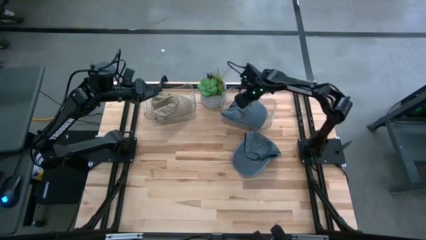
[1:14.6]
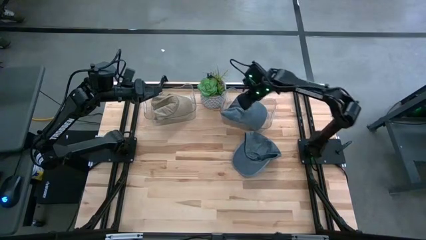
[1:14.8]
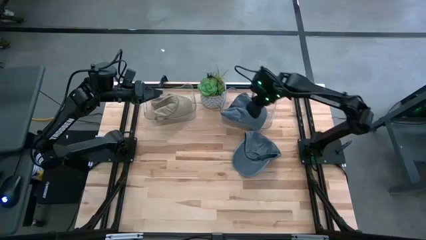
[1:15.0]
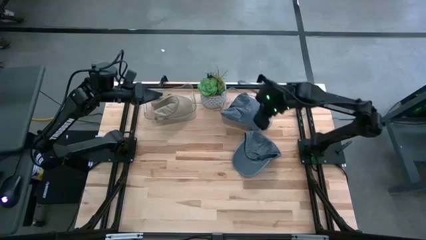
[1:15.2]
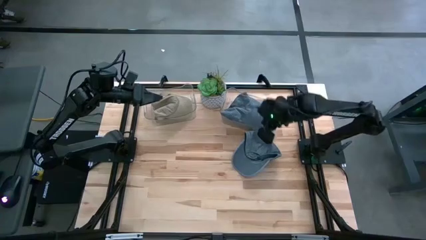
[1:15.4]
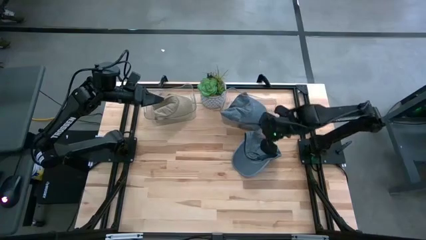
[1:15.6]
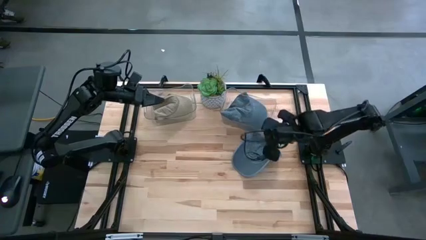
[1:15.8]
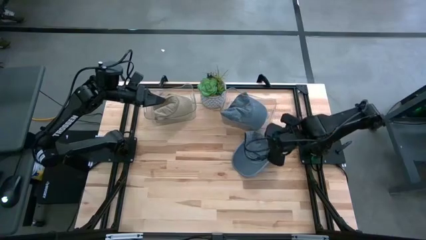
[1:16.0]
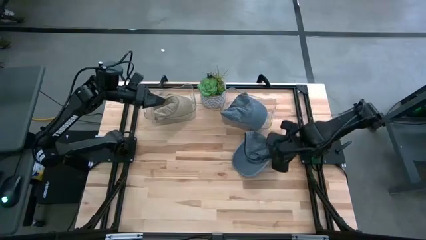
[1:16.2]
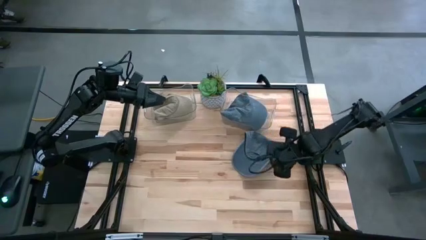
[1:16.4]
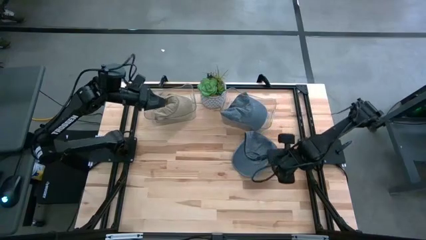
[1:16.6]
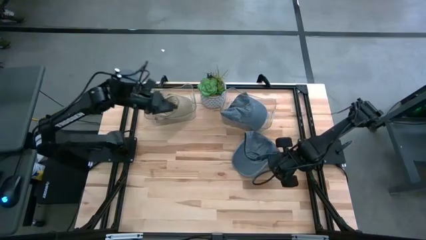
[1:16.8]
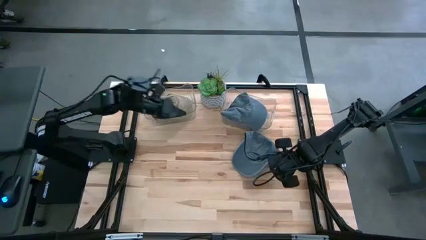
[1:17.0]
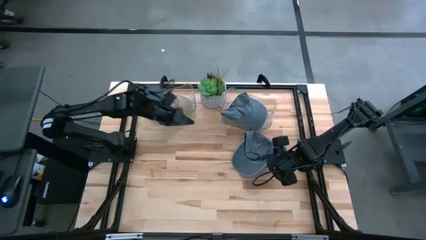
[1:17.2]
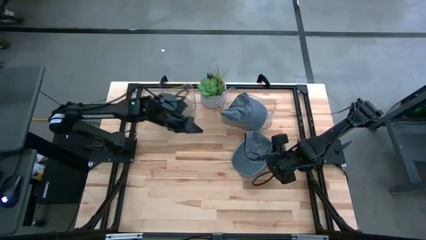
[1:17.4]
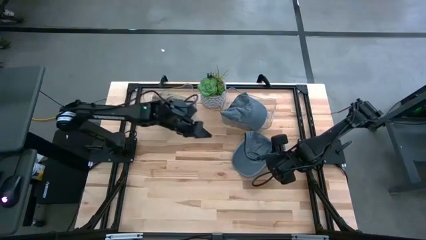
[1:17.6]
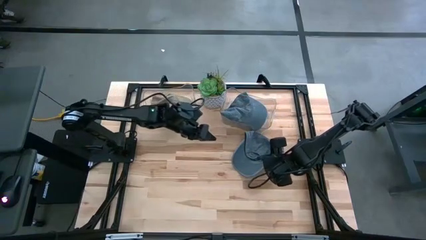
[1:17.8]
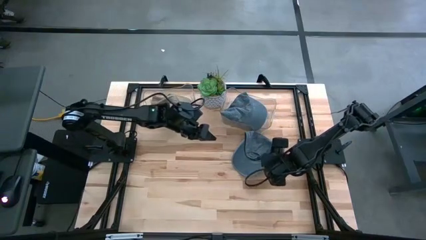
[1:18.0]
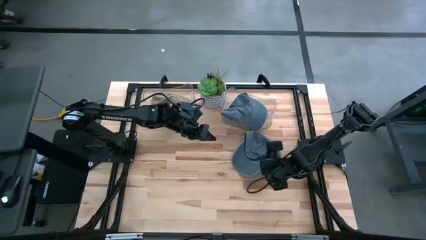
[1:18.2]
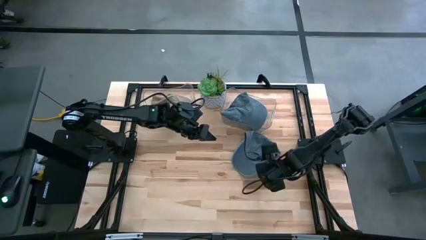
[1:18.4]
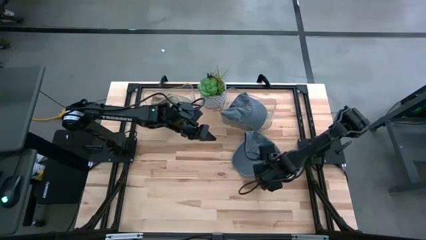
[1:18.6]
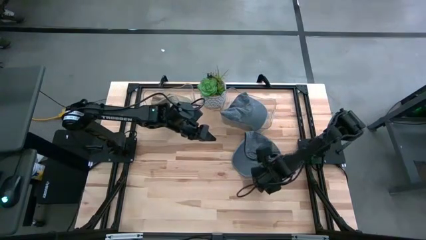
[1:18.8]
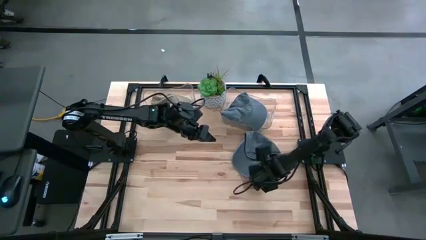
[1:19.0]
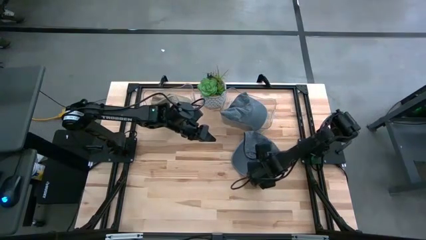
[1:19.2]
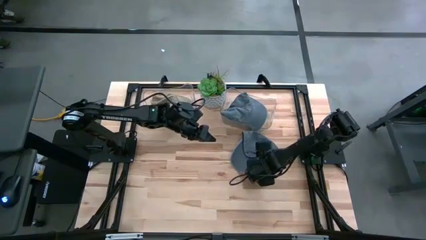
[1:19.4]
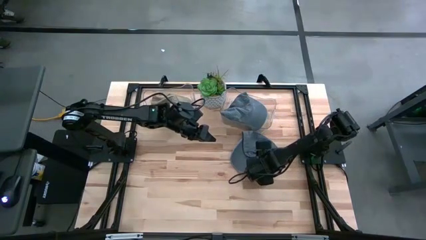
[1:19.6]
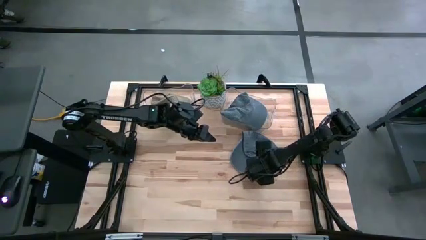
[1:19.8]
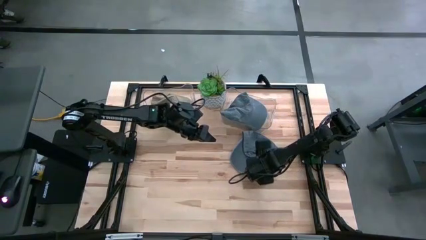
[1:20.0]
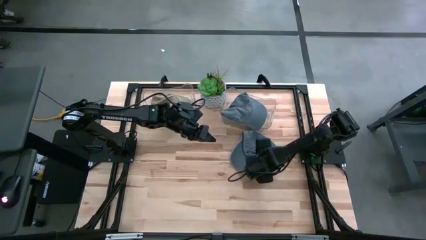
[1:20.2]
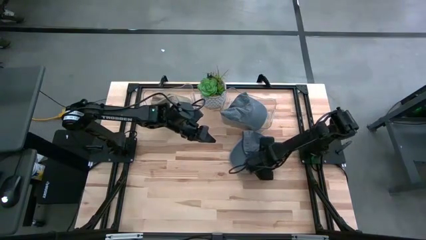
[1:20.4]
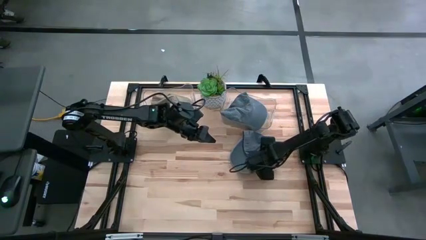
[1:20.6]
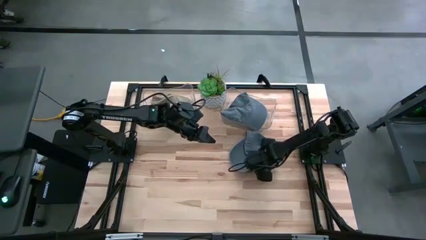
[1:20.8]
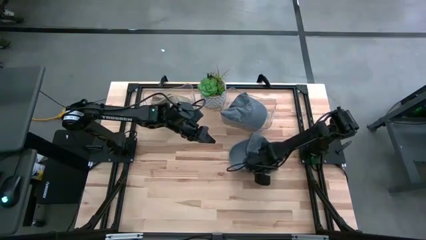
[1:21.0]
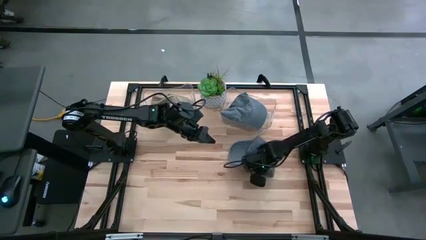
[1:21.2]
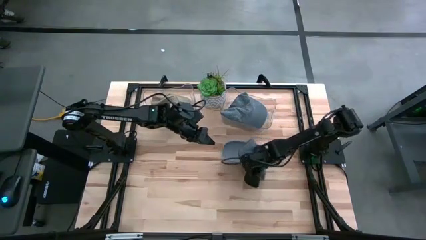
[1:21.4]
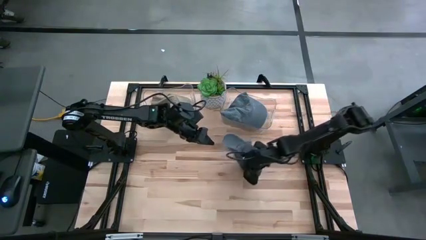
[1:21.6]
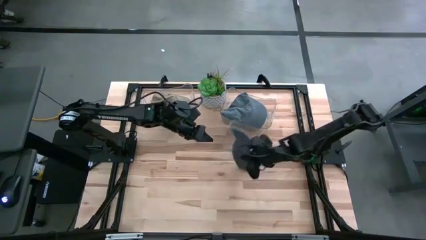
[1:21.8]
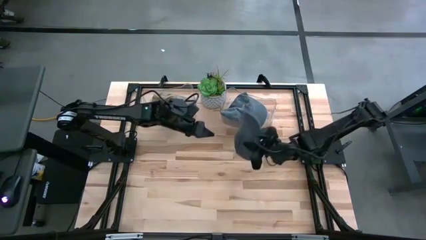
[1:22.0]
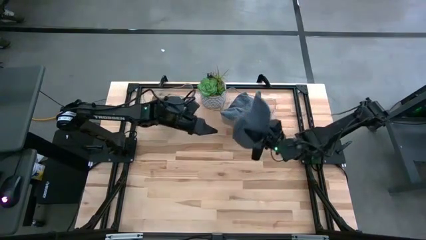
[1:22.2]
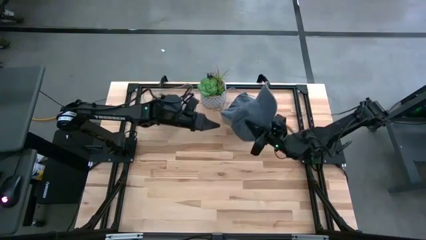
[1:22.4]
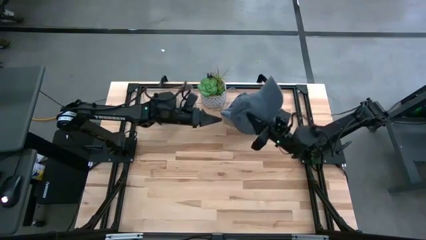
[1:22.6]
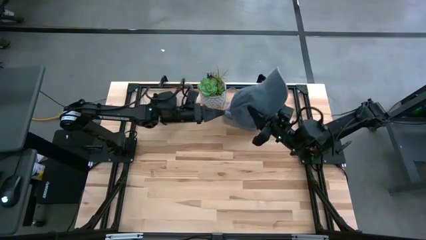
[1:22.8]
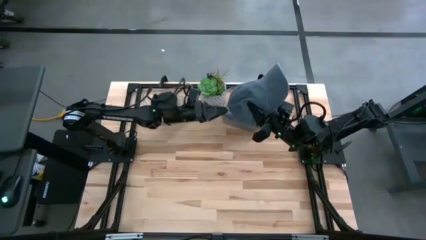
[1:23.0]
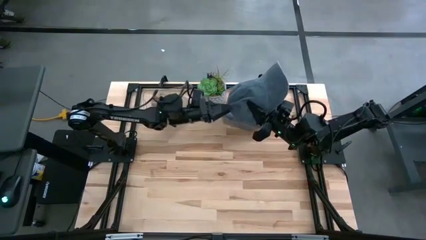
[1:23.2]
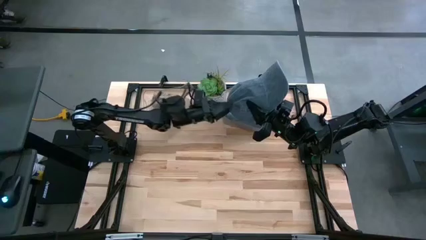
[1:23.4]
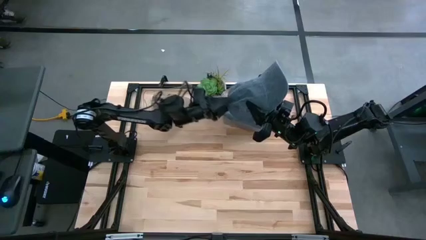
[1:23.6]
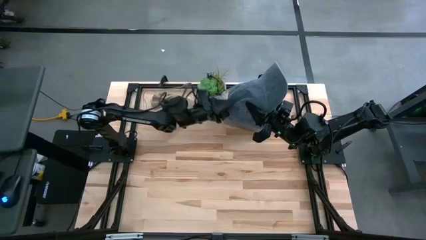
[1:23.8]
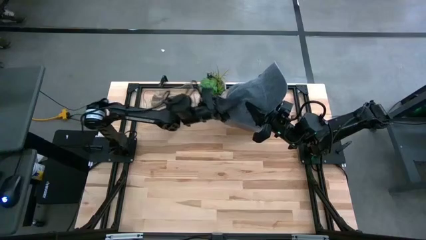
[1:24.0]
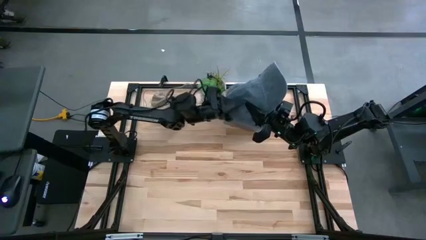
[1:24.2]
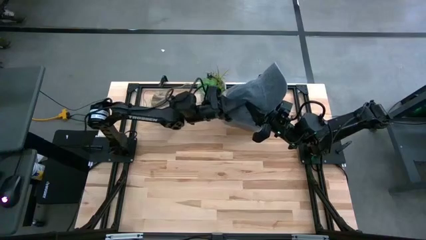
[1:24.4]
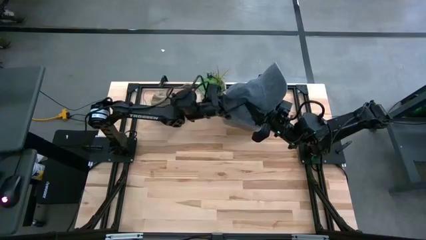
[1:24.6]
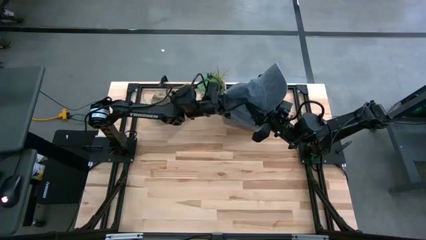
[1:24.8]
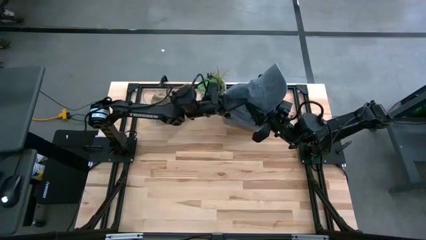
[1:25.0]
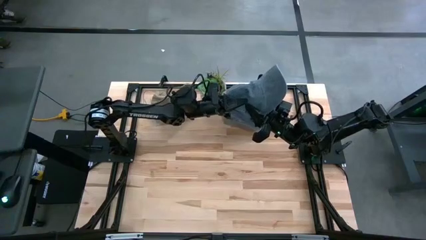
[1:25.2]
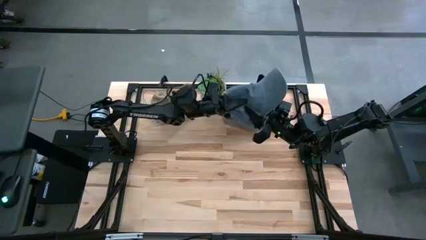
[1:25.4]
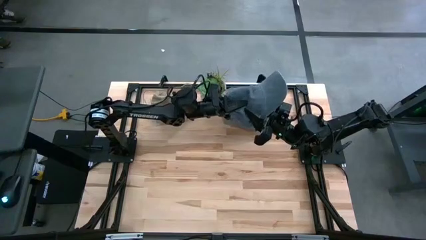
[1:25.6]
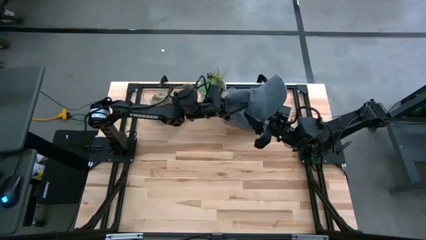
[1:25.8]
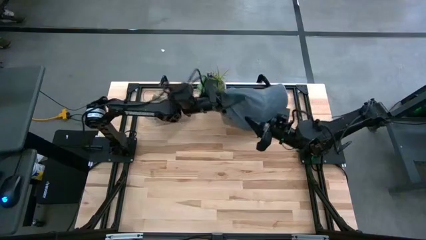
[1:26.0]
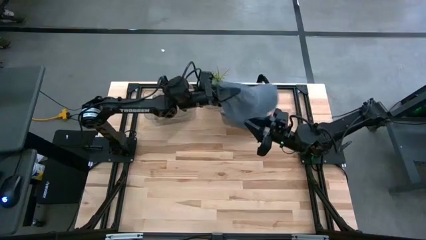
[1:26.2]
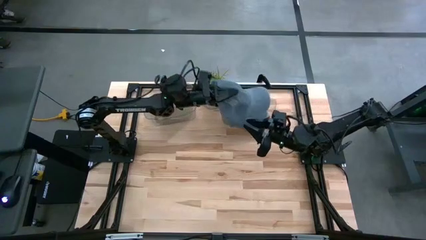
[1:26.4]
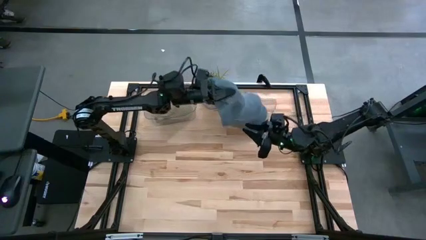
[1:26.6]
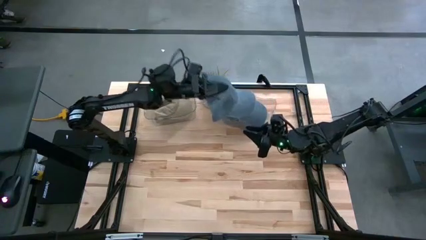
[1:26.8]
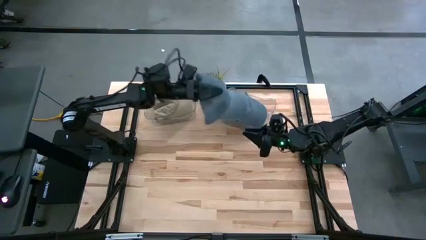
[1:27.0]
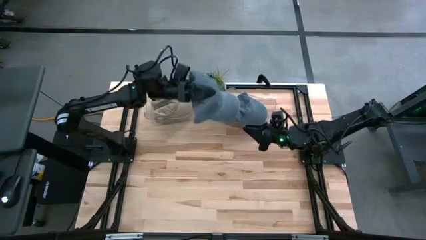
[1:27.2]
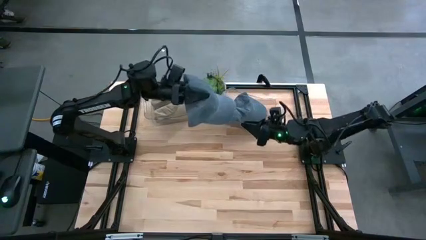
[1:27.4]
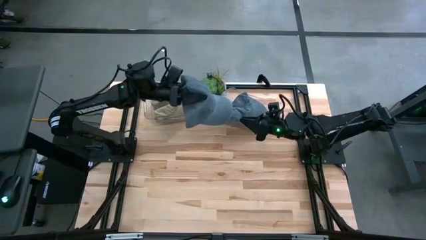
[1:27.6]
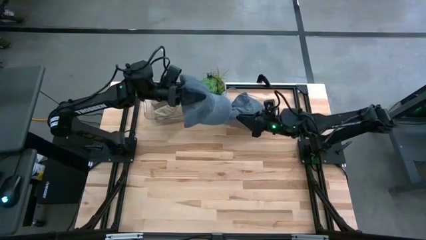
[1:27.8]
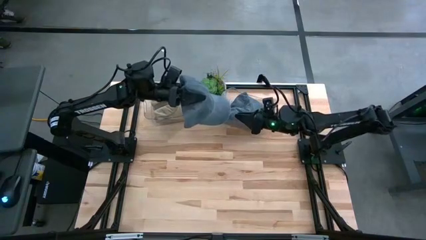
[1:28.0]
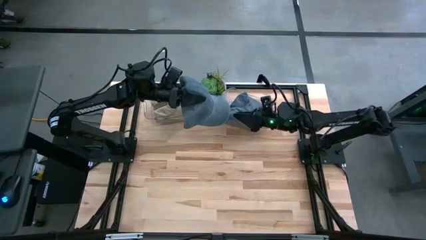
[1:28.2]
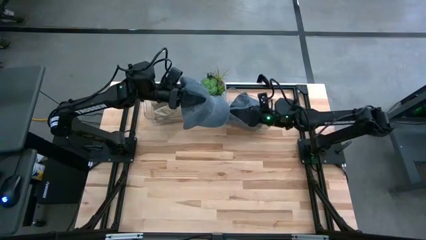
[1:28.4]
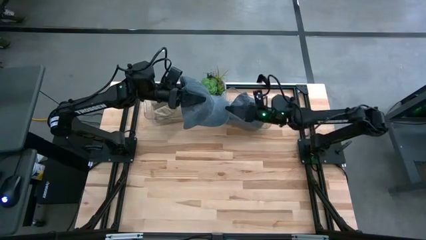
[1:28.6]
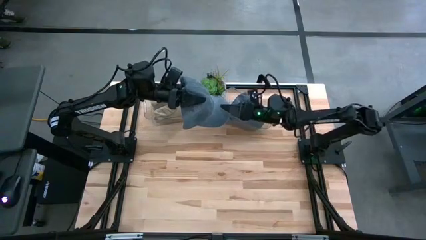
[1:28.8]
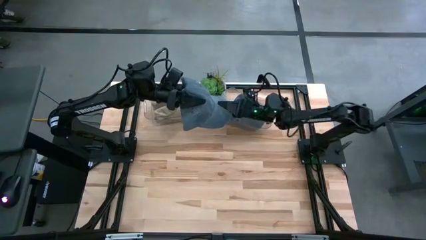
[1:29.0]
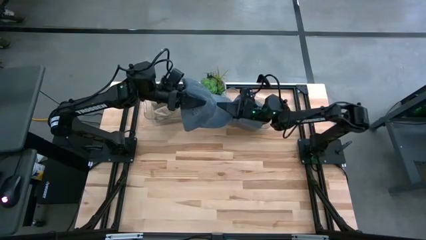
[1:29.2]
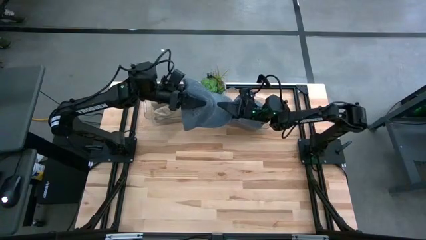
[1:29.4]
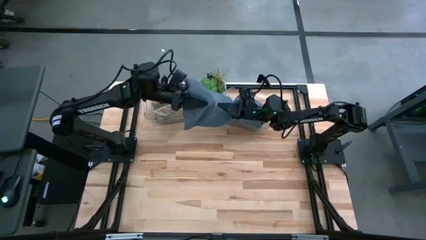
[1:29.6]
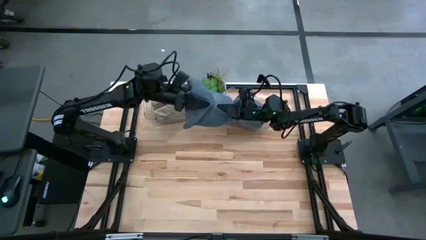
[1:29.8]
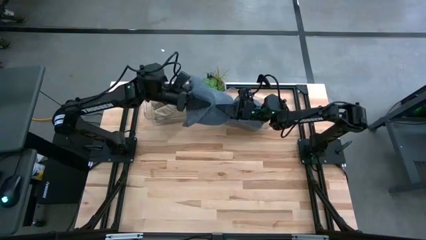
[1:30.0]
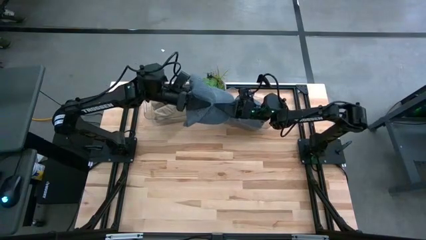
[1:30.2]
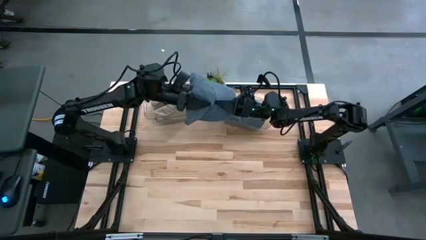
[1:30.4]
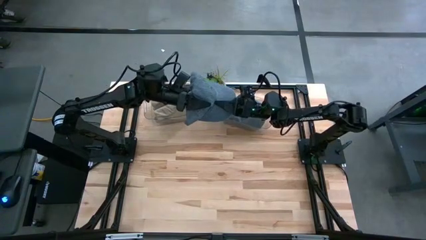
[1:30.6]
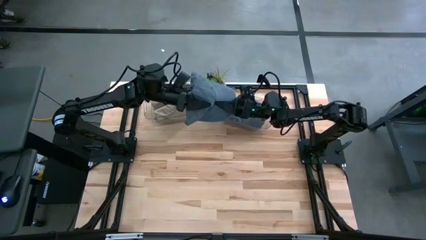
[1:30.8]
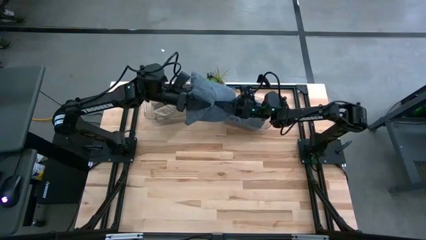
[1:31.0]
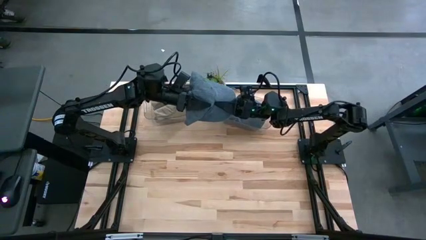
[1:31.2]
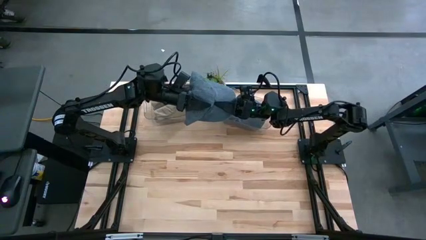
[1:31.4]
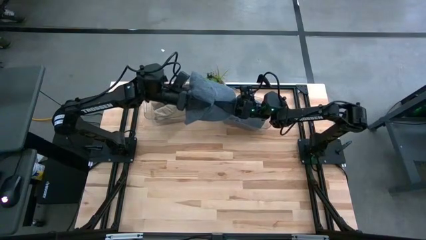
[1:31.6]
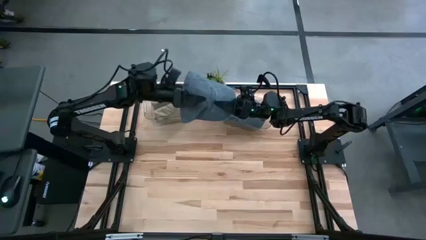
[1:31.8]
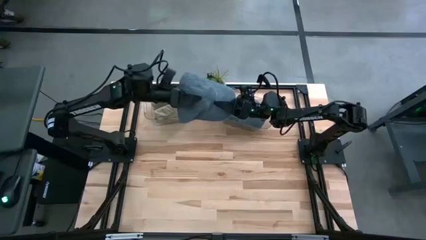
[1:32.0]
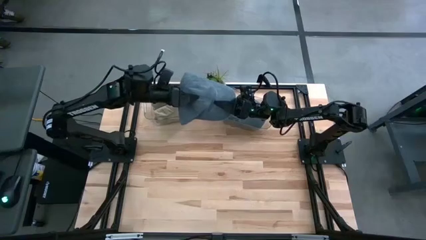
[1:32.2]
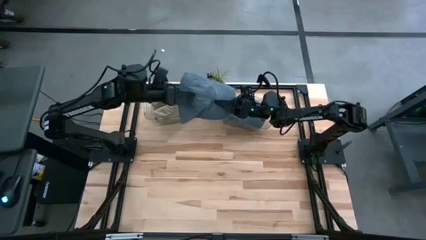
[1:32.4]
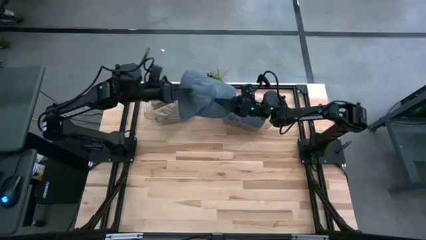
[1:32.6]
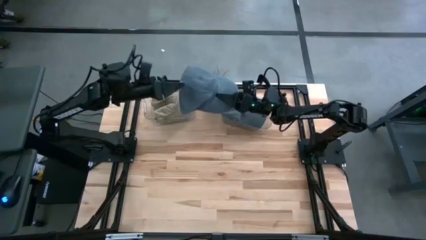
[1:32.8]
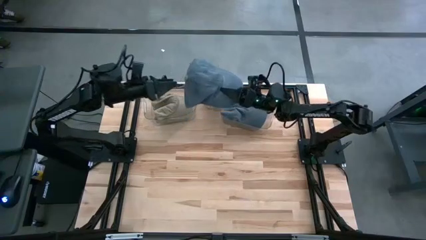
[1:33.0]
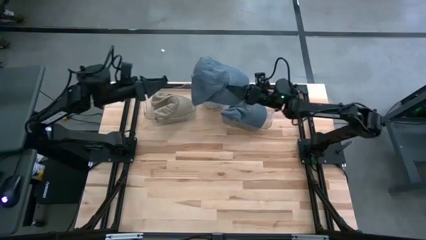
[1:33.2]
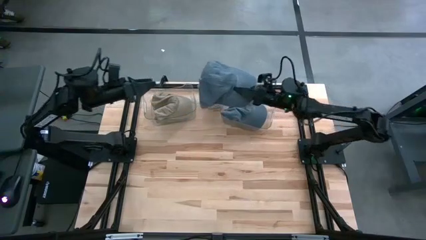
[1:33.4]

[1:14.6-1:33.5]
Task: Pick & Place hat
Put the blue cap into the right transparent bin
